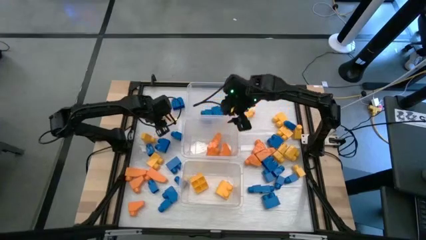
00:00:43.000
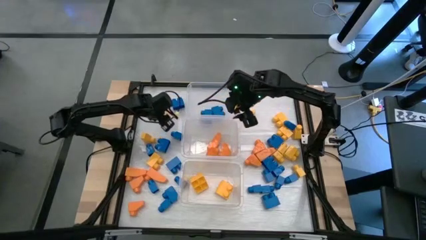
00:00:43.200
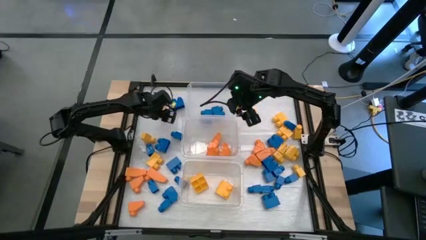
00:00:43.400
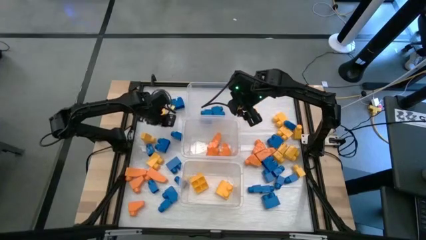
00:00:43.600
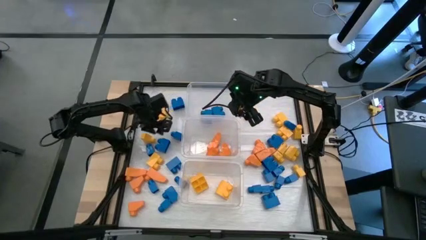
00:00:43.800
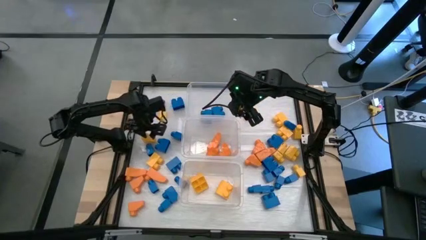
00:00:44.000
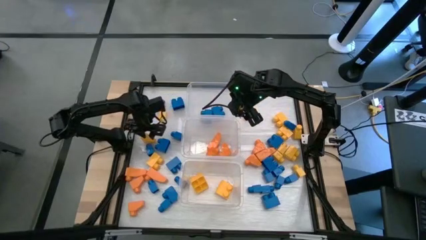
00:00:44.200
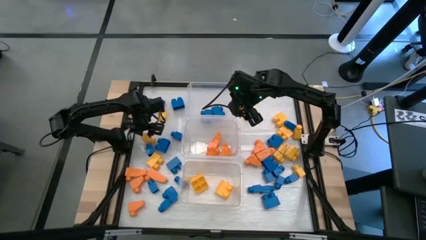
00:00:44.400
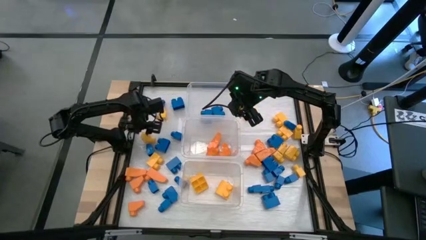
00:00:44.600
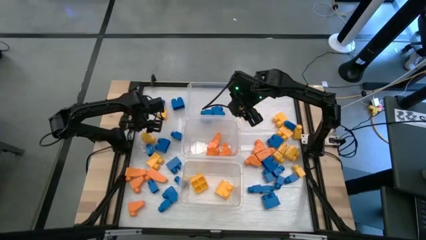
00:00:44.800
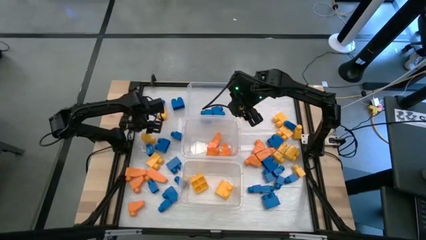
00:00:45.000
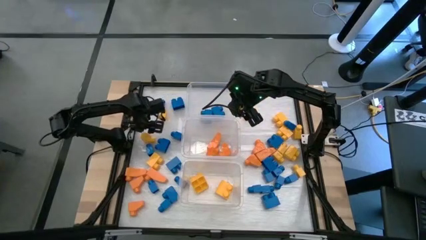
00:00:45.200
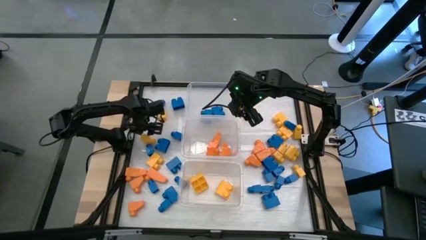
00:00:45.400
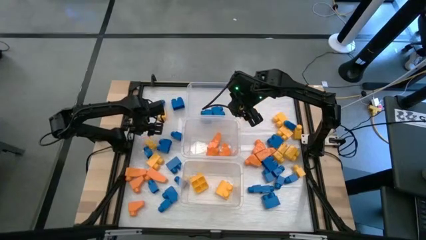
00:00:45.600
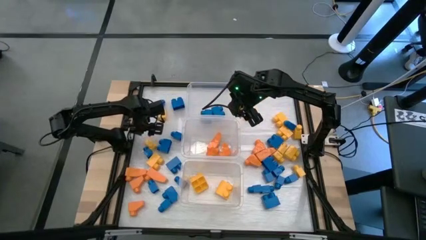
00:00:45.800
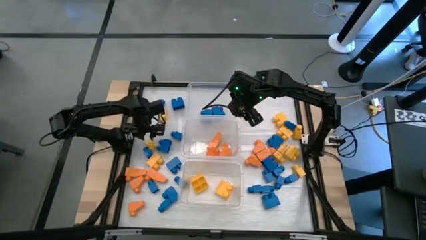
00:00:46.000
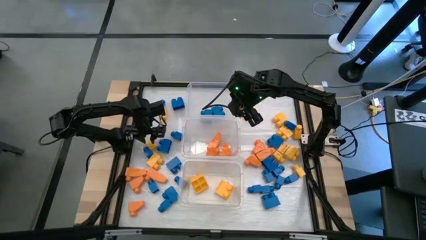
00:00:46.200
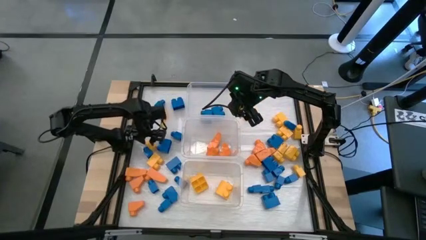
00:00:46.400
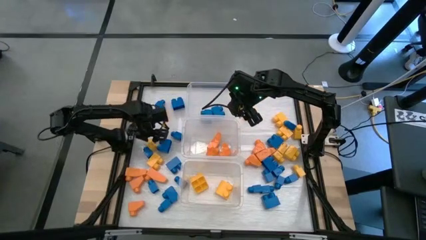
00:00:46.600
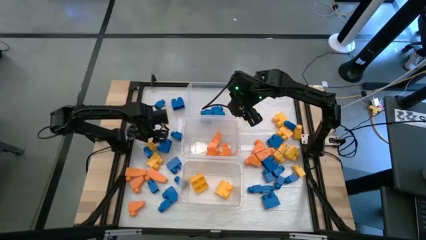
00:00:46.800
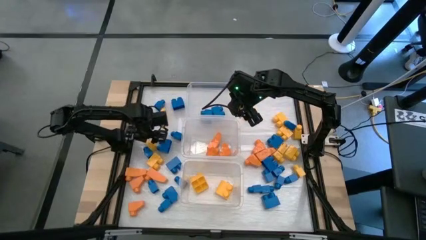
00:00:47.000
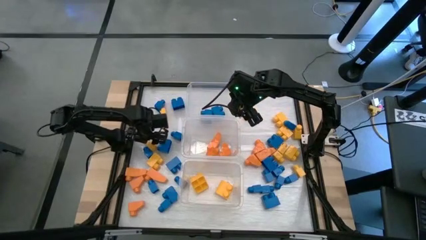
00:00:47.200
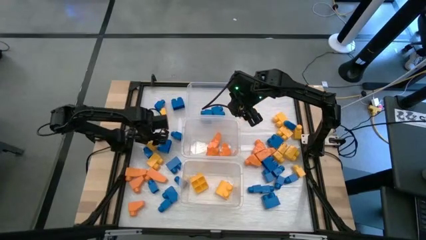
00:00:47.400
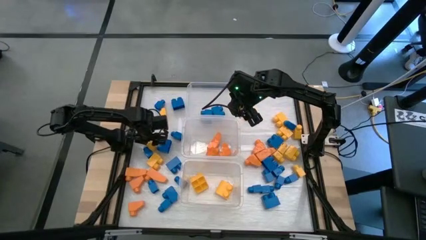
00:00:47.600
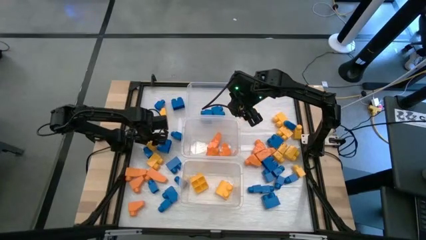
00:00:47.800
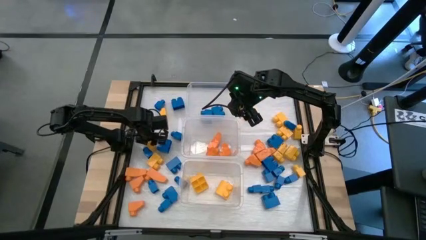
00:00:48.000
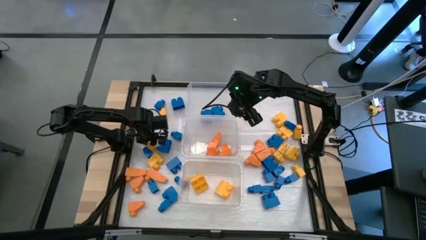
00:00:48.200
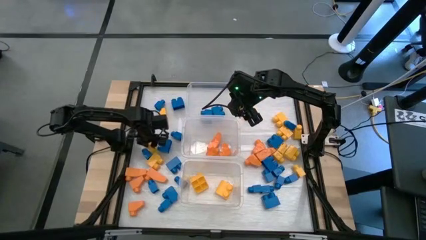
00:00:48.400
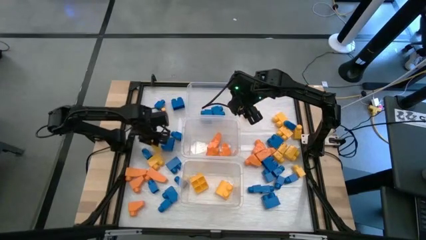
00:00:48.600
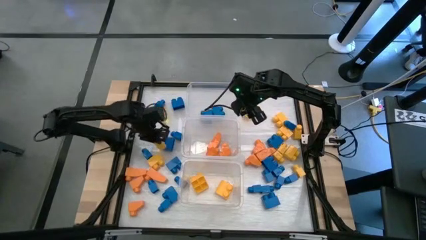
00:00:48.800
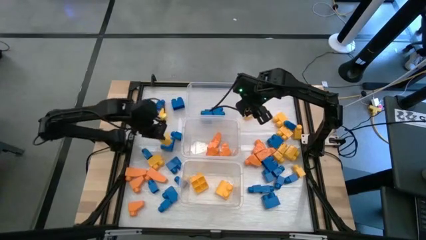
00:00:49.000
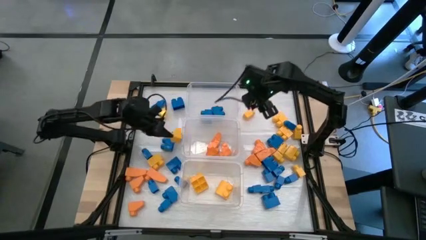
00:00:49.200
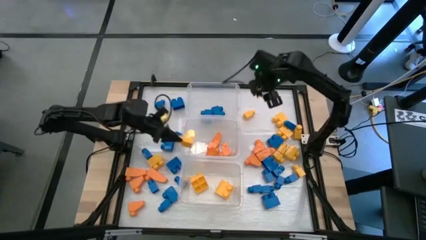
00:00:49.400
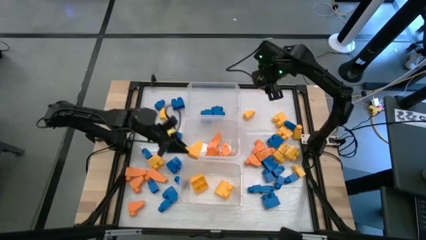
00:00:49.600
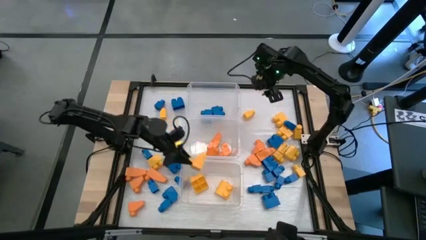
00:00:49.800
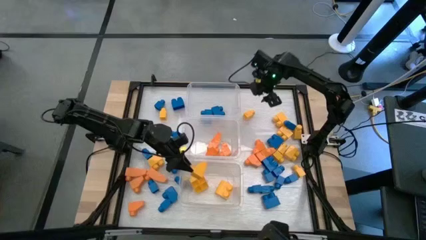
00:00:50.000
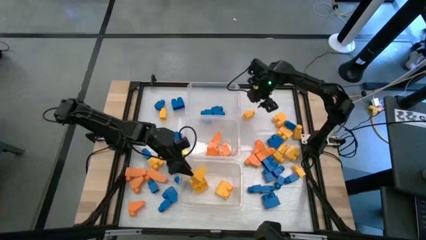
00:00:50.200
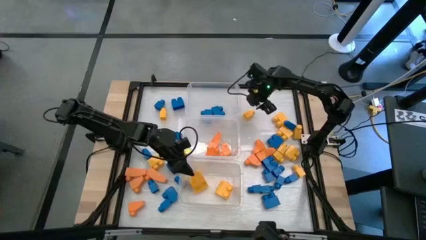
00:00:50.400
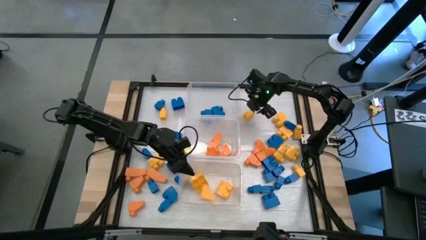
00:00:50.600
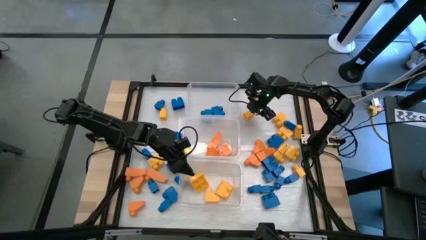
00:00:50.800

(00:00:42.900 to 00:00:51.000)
Task: Sort blocks
Put the yellow game piece into the bottom transparent bin

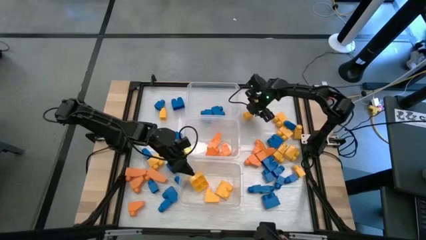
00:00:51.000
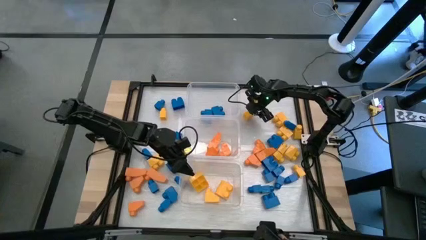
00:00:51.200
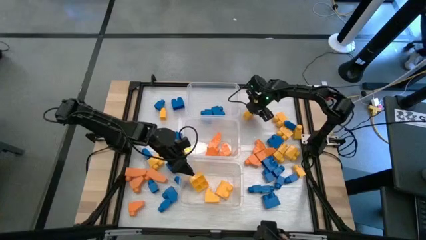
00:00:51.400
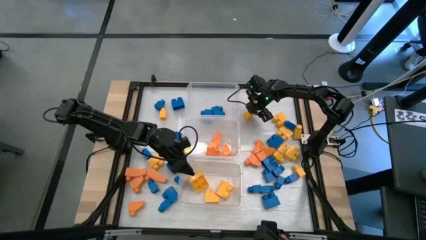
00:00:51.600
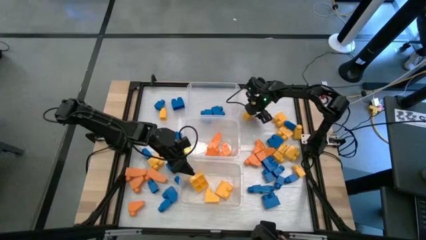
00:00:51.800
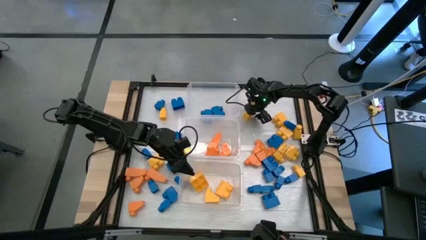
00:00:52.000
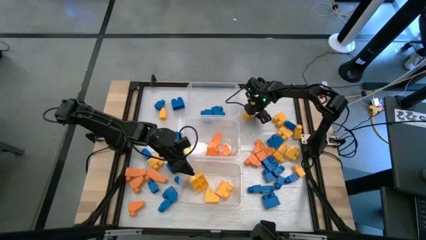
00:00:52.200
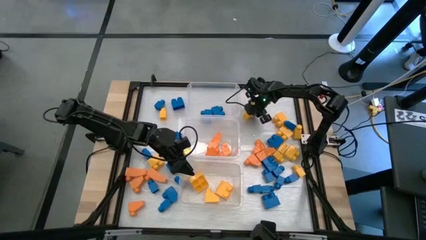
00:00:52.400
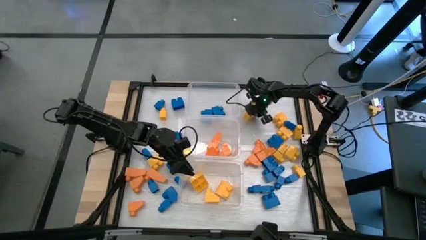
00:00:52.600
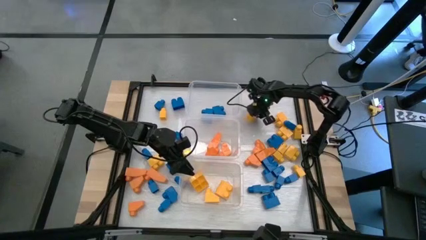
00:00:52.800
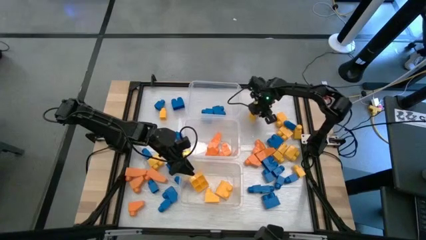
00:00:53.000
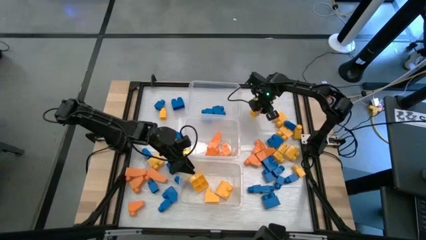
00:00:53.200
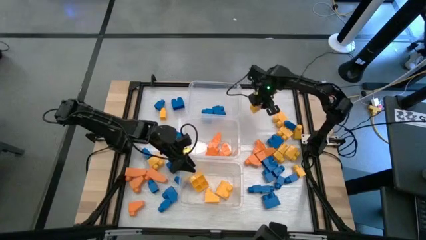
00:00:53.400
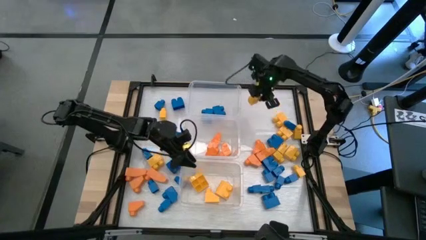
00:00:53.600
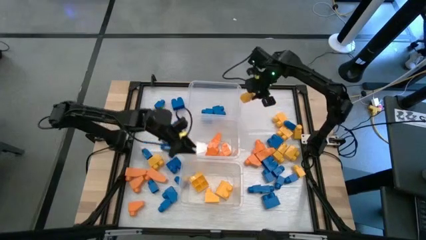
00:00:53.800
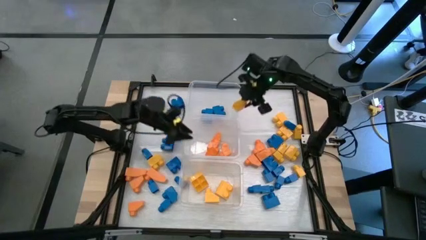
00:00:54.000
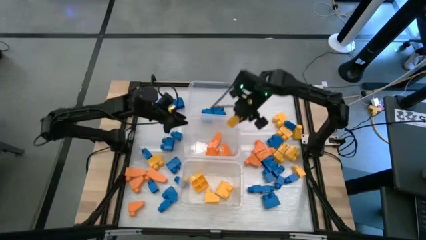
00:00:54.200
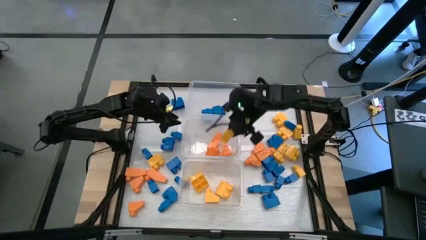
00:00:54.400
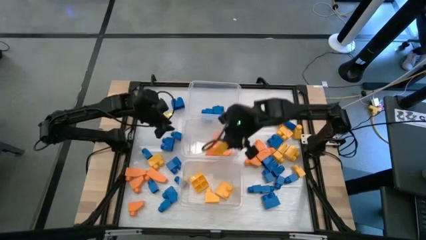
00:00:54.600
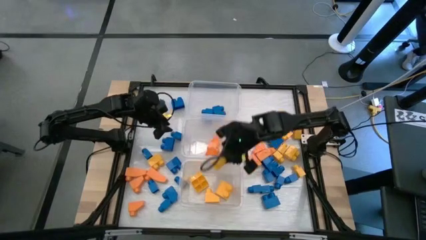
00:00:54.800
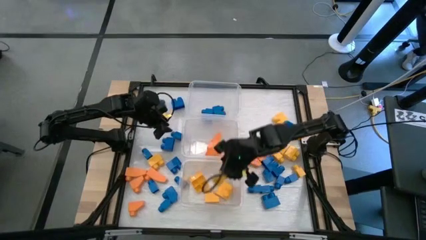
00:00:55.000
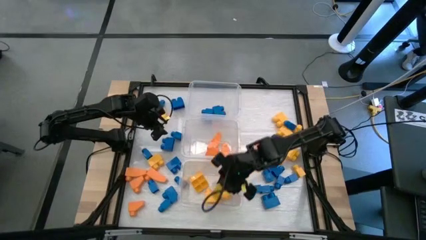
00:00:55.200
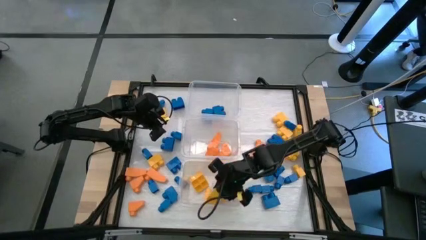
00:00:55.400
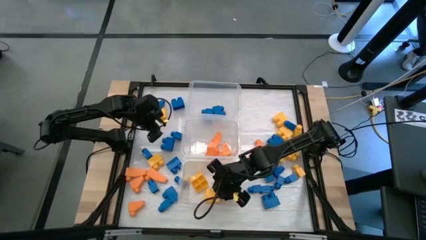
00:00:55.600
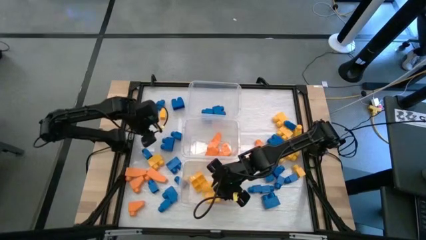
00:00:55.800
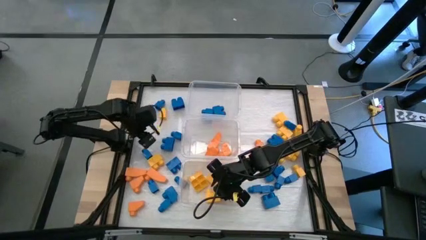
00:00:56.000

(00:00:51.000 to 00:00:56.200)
Put the yellow game piece into the bottom transparent bin

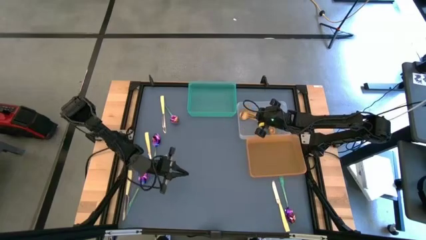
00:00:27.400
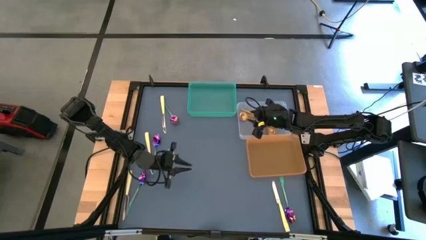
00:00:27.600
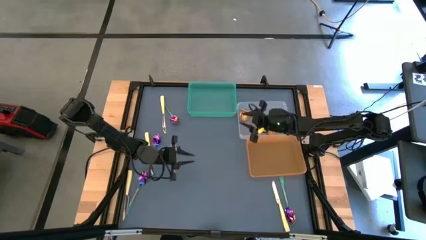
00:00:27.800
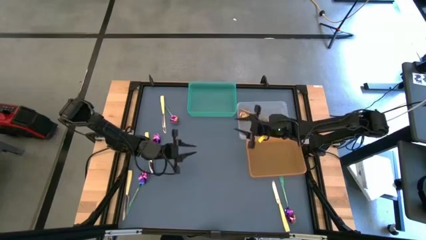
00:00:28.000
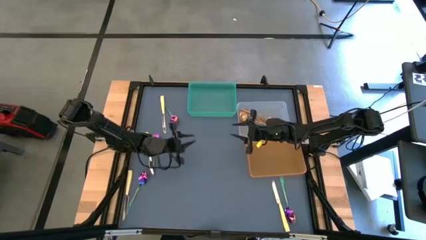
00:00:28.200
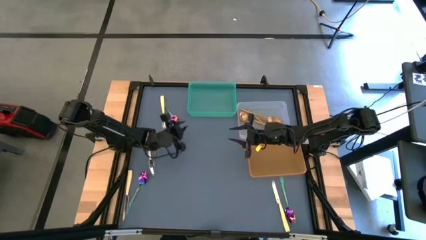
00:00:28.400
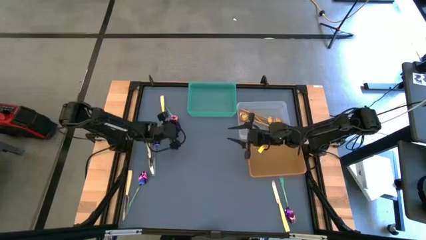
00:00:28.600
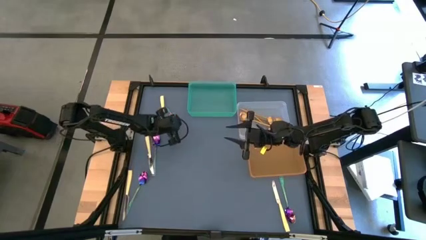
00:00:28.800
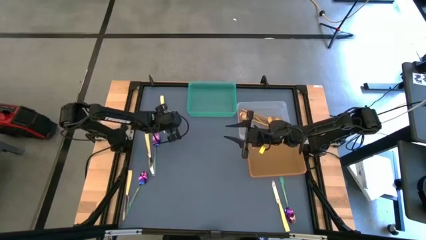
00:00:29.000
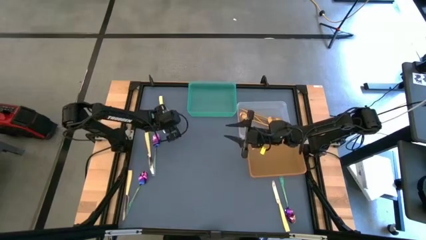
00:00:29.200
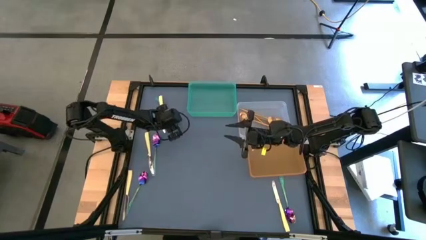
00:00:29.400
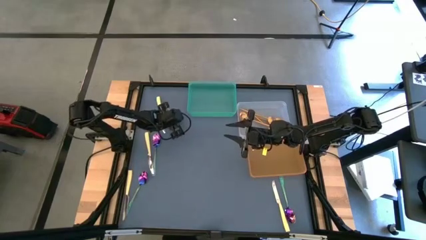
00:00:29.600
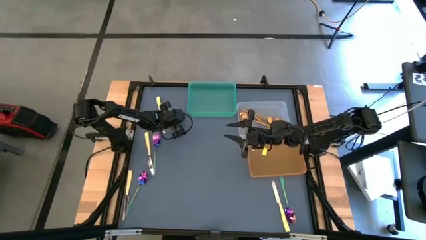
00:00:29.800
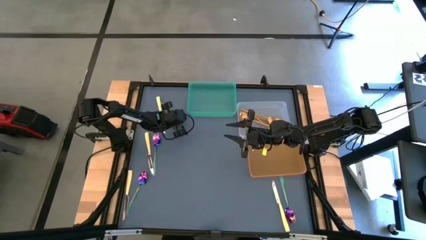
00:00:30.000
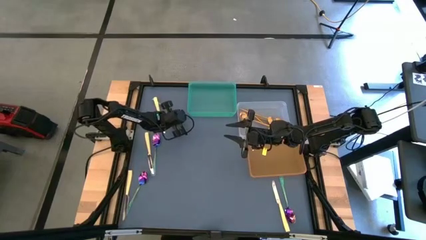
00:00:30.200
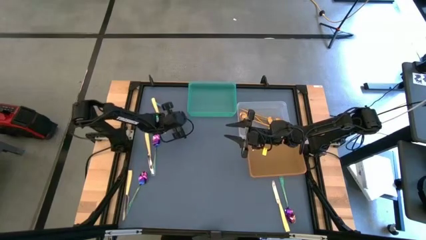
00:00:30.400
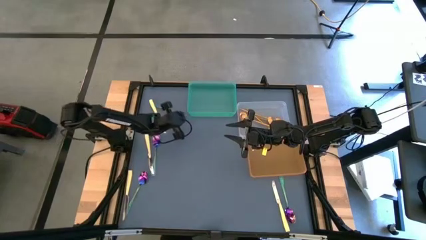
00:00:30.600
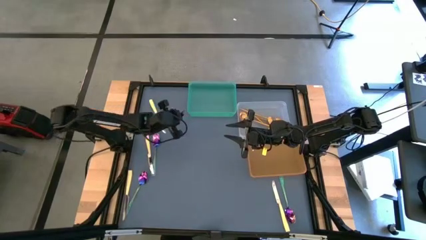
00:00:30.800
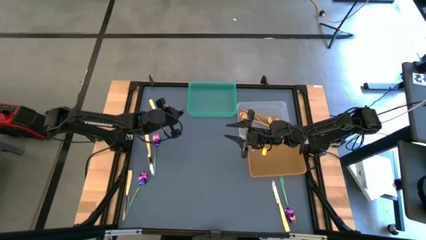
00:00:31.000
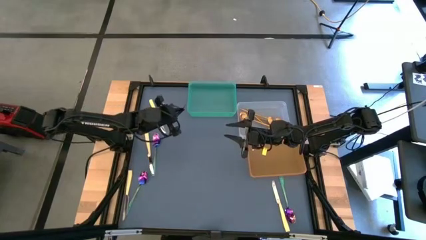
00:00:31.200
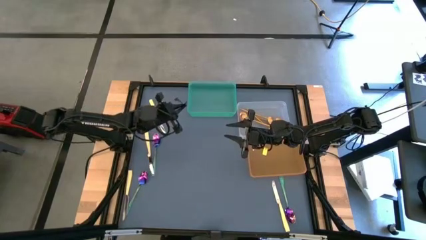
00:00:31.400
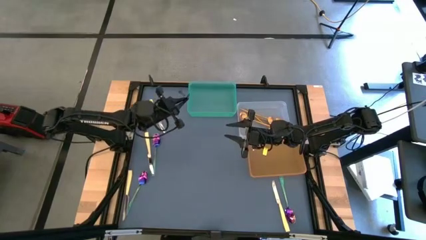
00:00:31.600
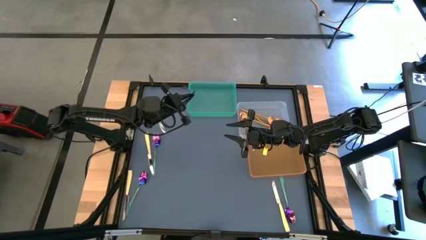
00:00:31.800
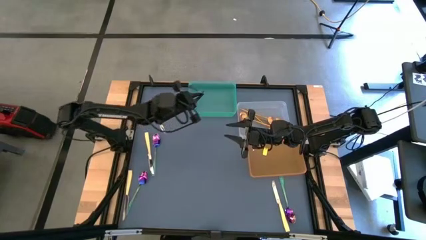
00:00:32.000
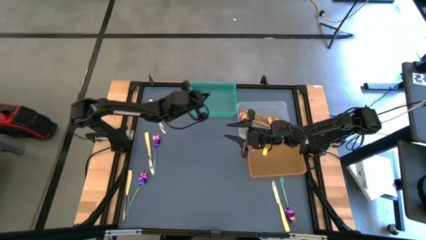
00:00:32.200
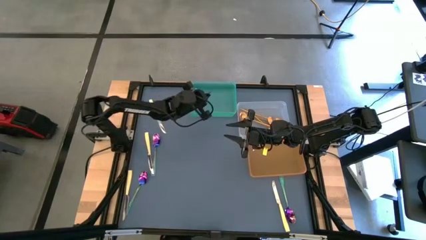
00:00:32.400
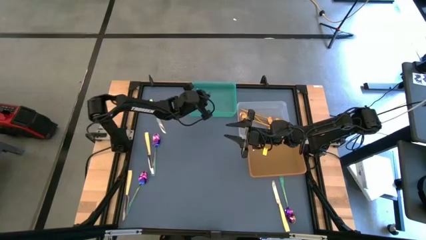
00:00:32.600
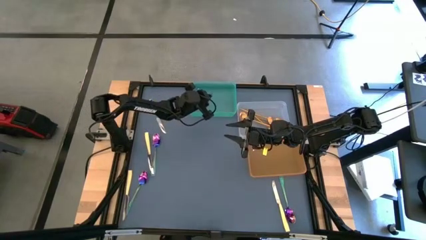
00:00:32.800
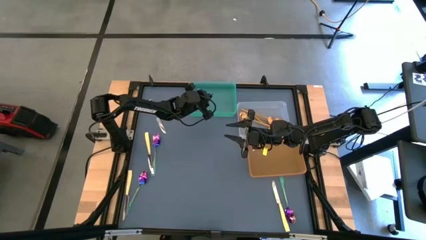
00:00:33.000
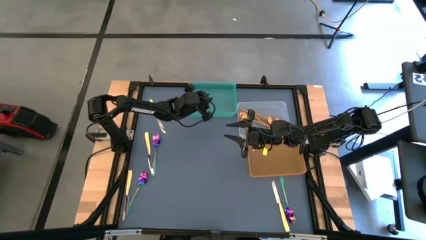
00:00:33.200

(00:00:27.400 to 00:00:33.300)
Task: Sort silverware by color (type)
Put the purple spoon into the green bin
